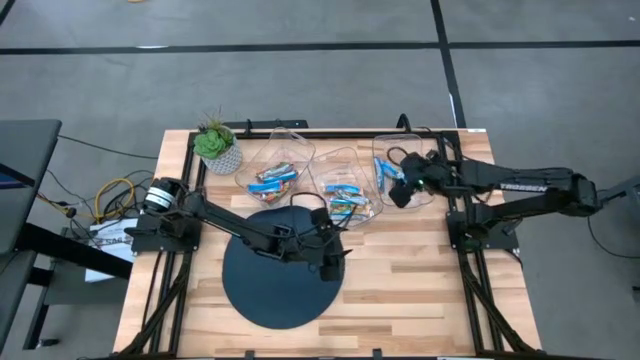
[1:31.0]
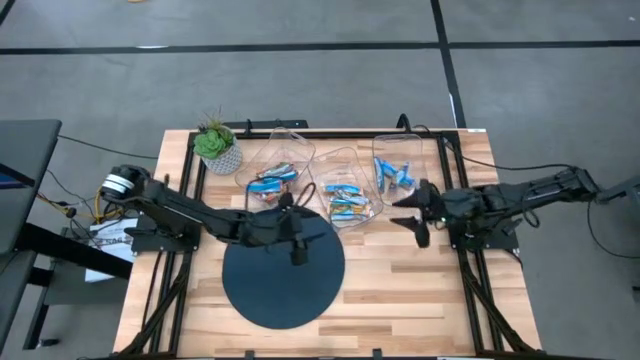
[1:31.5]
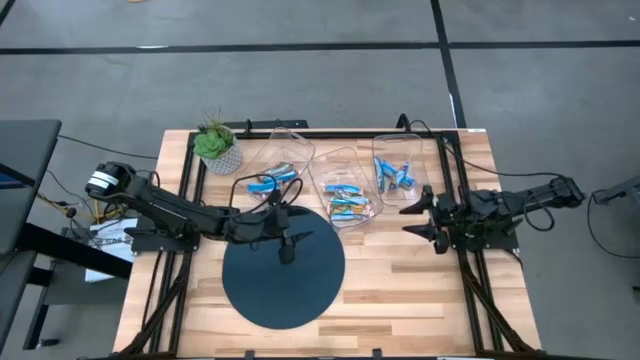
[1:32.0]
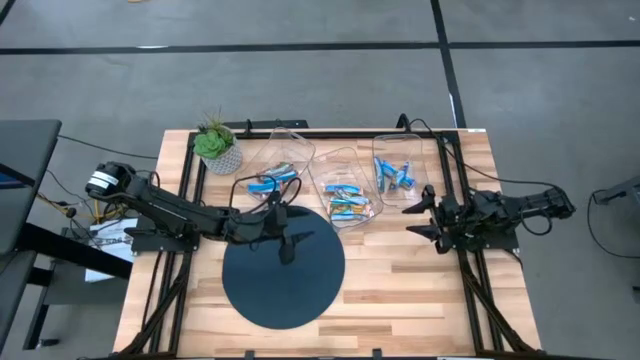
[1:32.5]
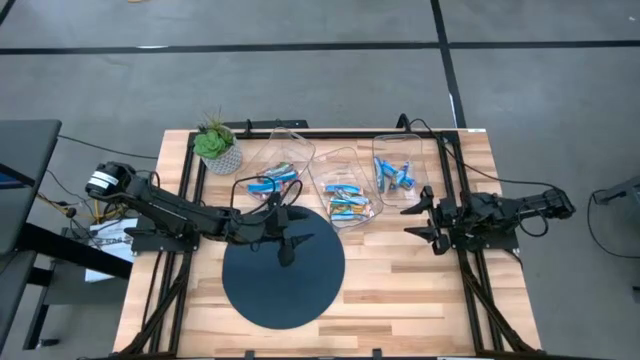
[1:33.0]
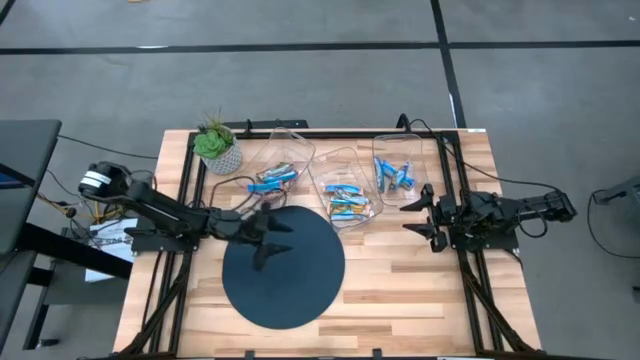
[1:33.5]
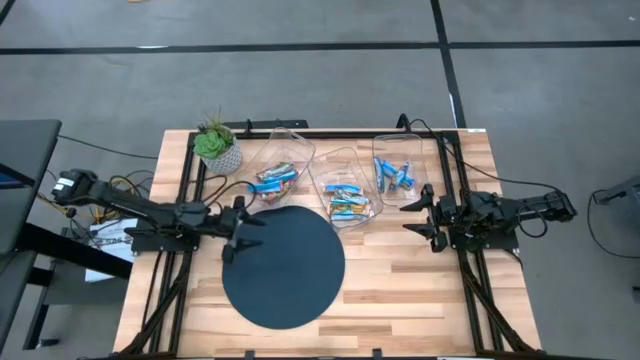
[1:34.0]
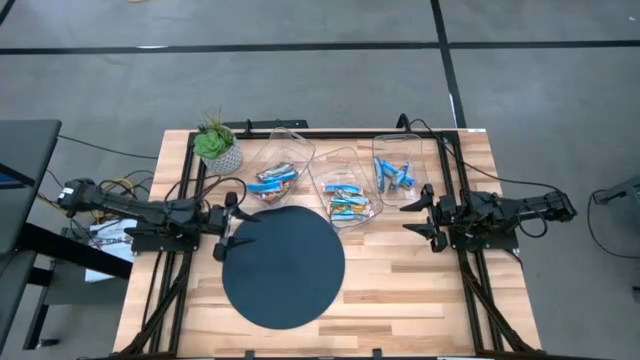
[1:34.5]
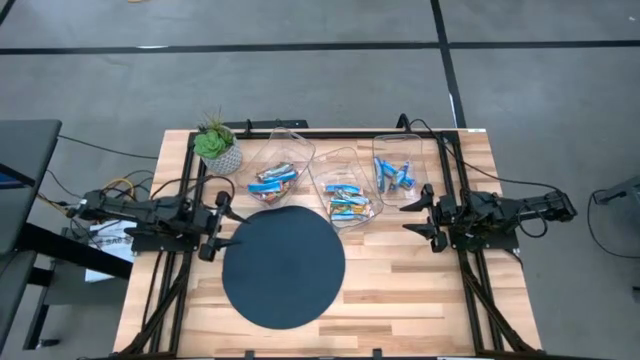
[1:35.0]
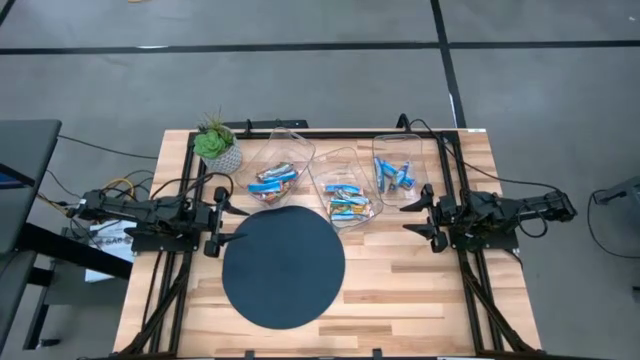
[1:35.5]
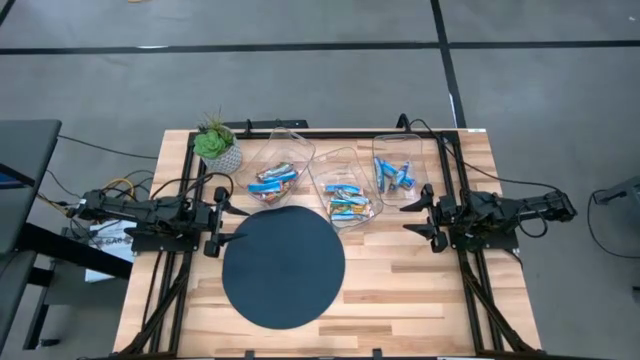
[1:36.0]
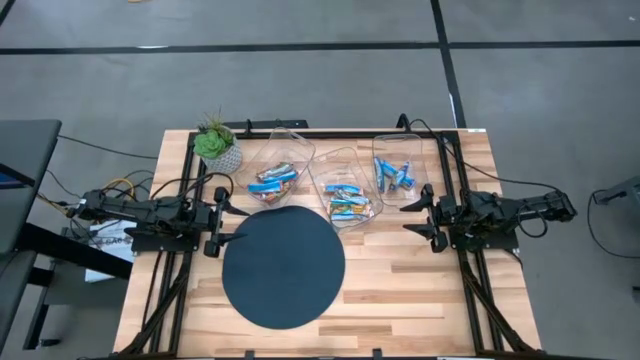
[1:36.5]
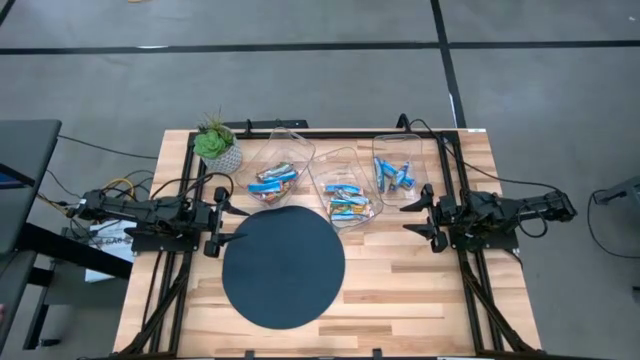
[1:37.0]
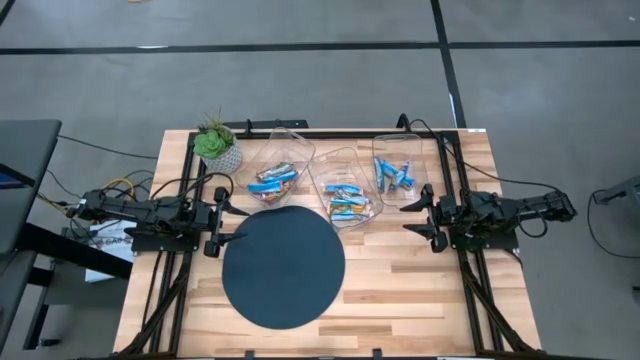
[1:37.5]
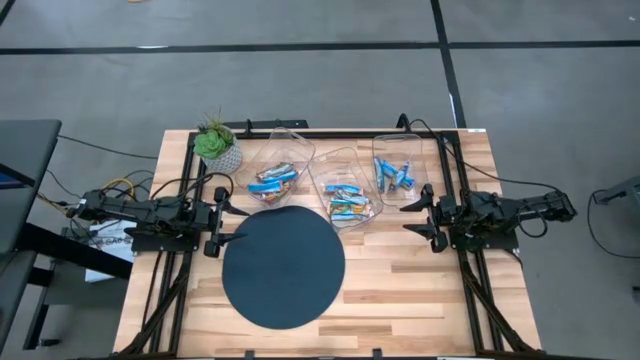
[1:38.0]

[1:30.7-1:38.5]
Task: Pick and place Granola Bars by type
Return to Home Position

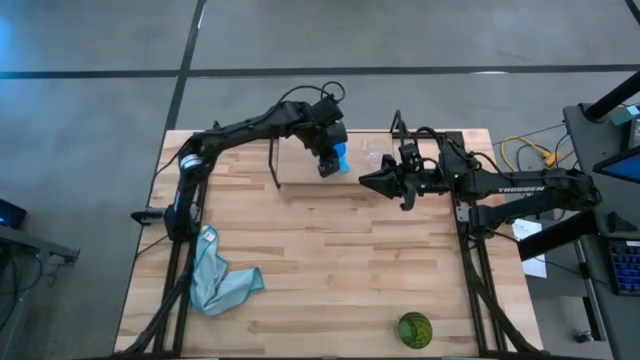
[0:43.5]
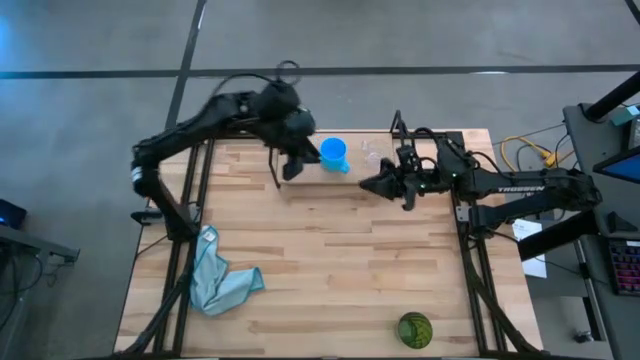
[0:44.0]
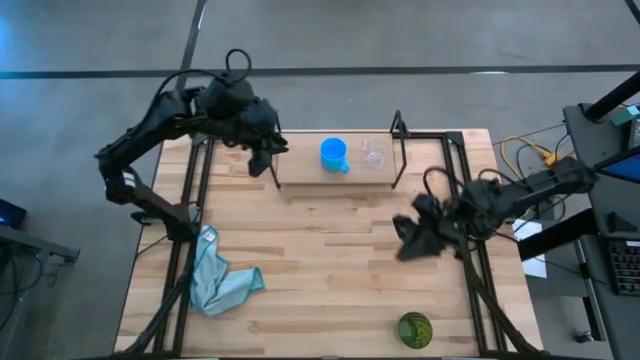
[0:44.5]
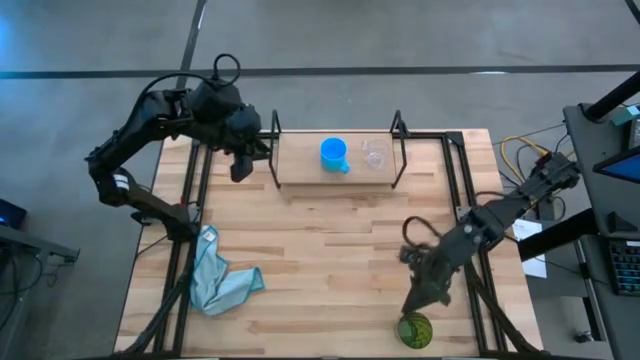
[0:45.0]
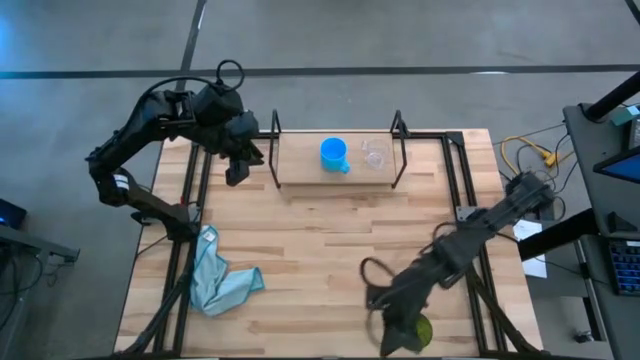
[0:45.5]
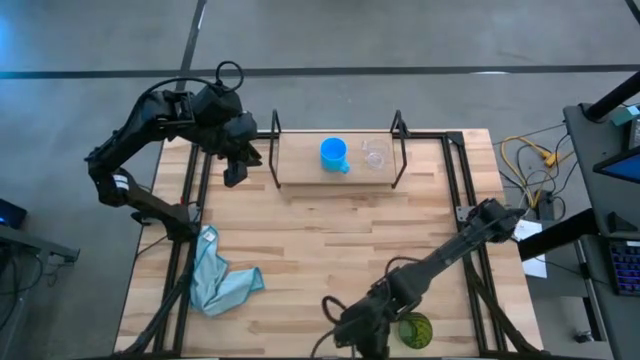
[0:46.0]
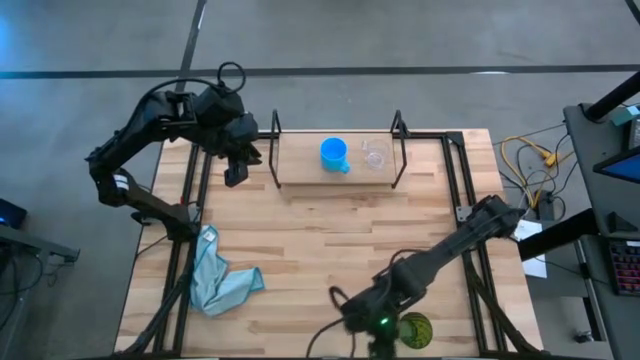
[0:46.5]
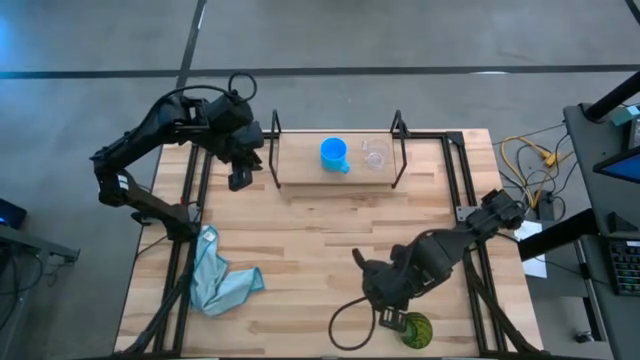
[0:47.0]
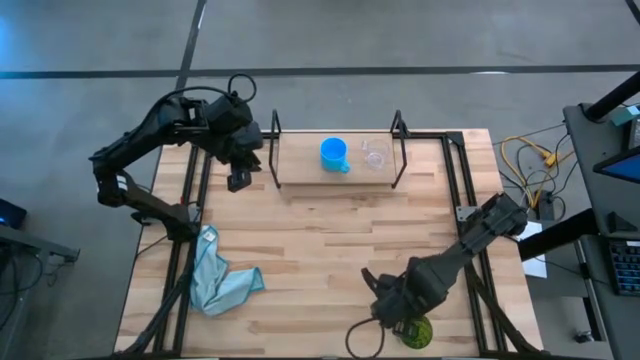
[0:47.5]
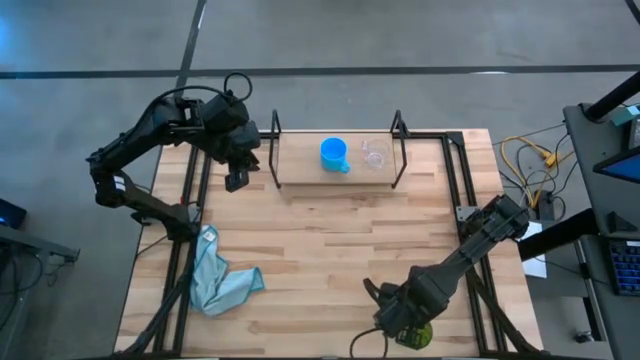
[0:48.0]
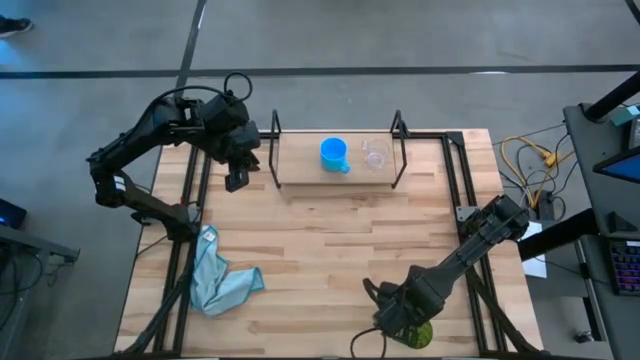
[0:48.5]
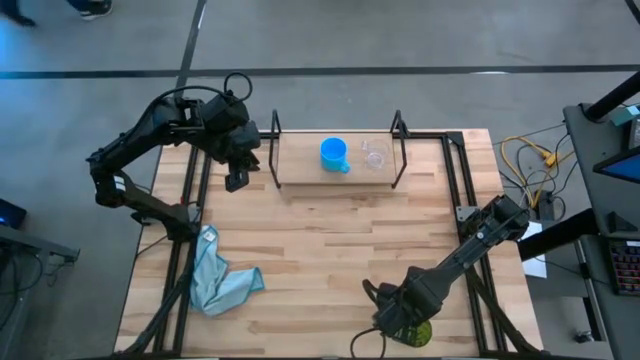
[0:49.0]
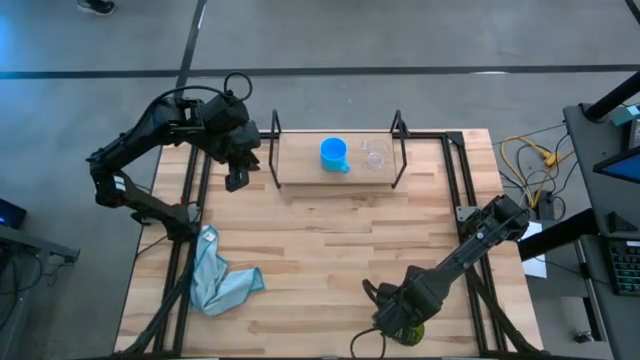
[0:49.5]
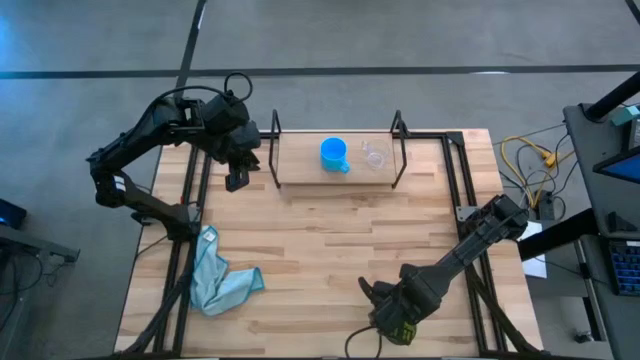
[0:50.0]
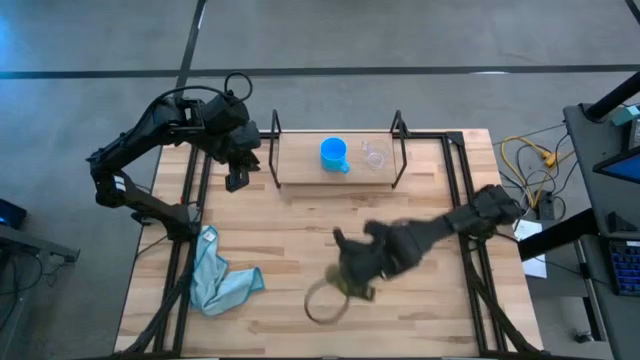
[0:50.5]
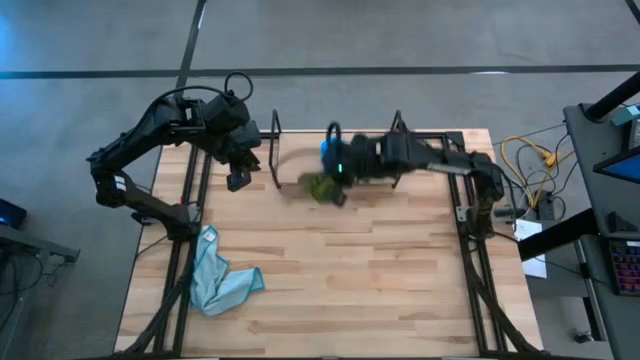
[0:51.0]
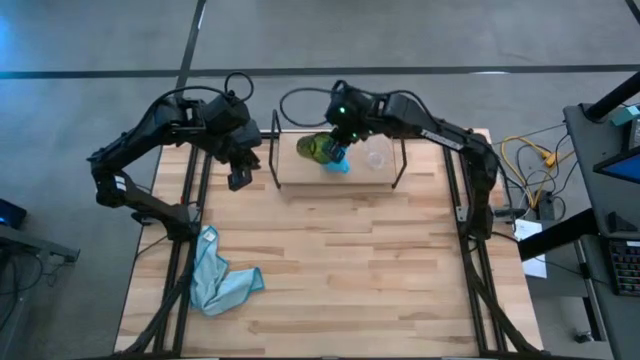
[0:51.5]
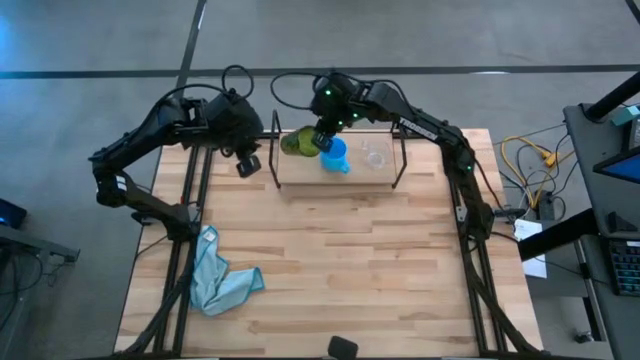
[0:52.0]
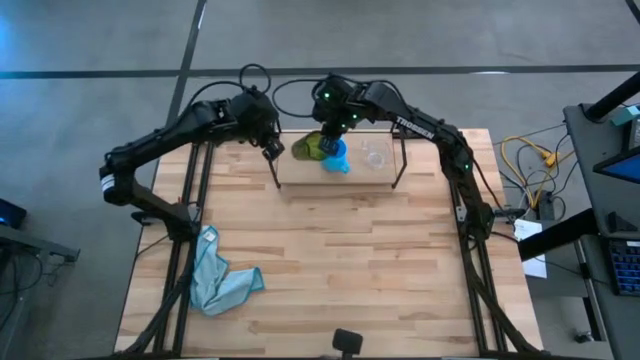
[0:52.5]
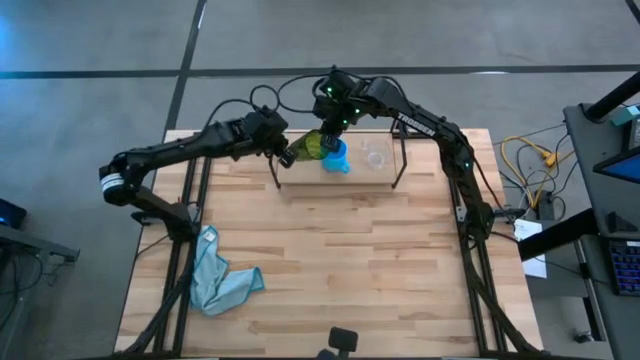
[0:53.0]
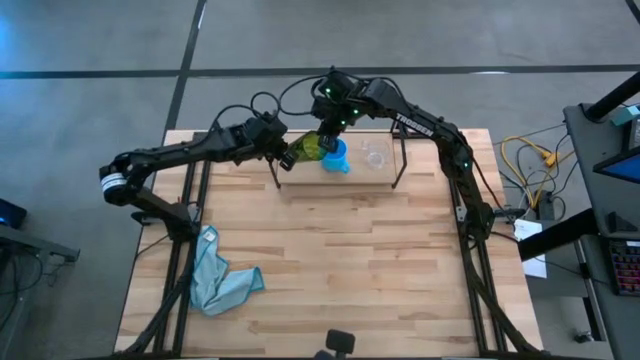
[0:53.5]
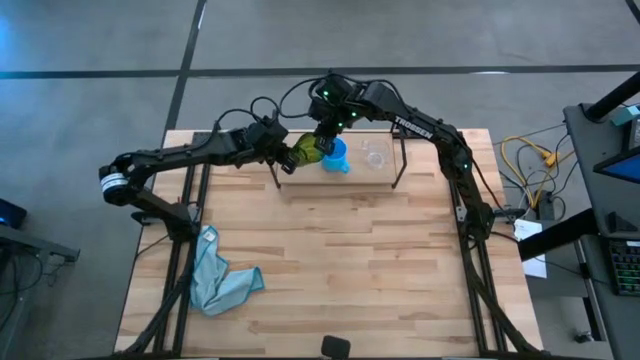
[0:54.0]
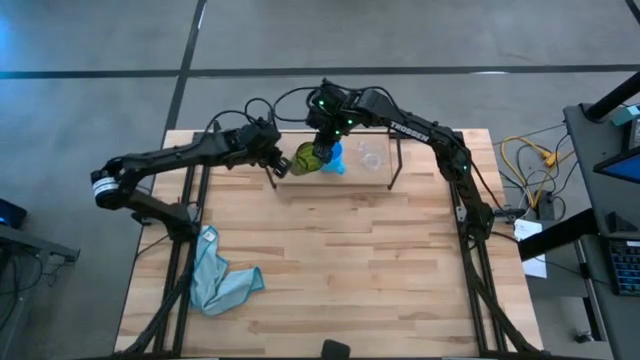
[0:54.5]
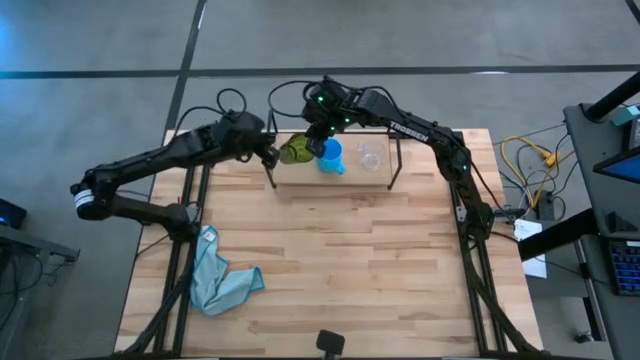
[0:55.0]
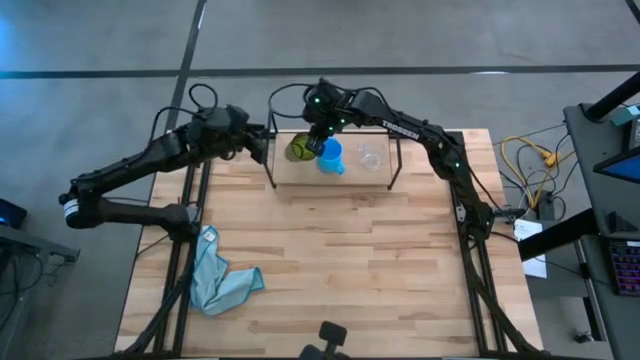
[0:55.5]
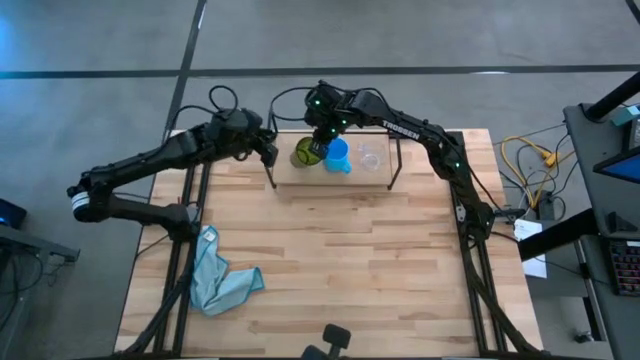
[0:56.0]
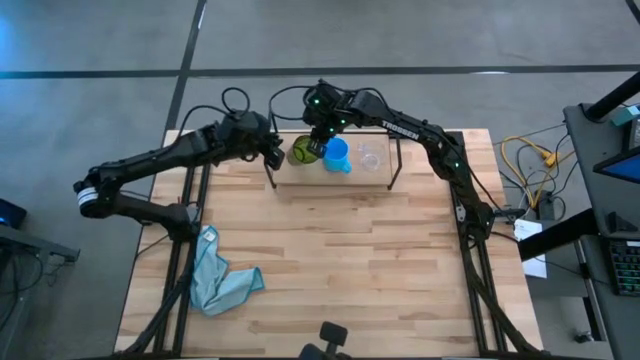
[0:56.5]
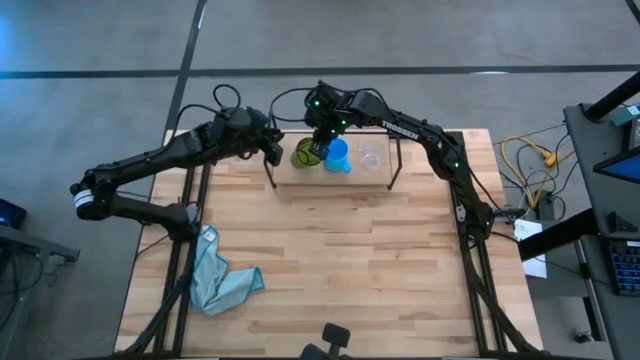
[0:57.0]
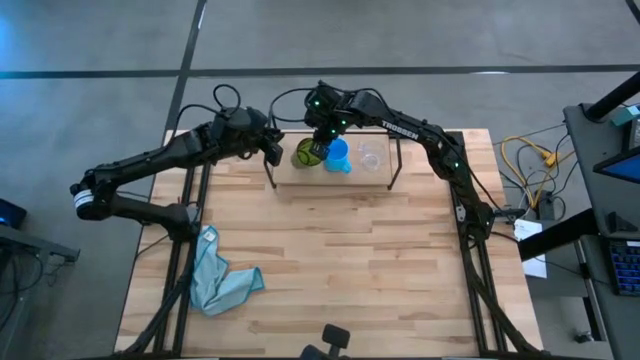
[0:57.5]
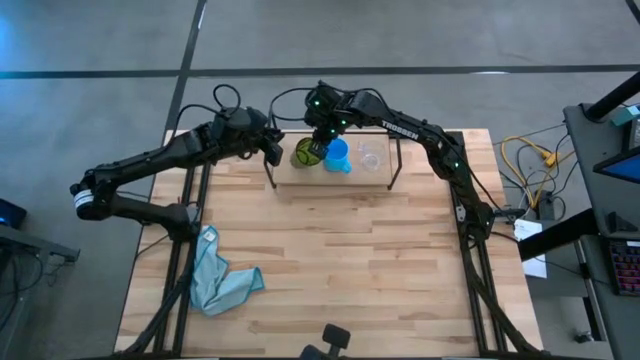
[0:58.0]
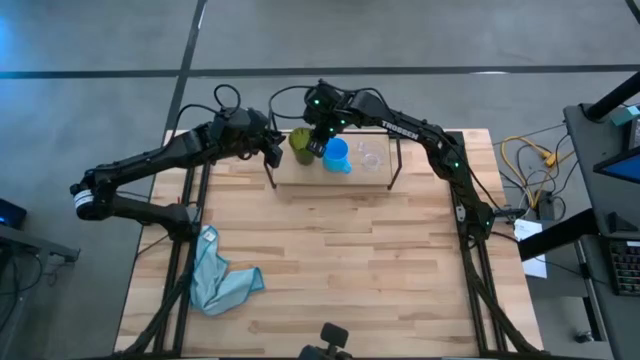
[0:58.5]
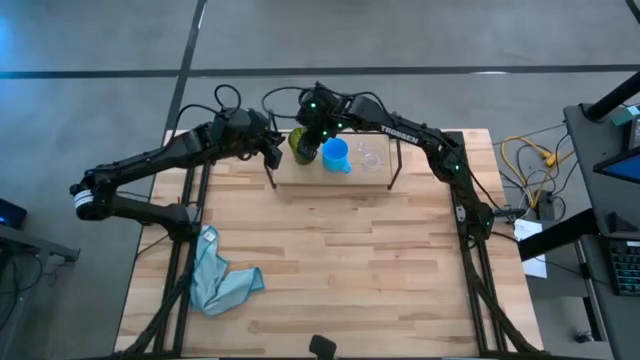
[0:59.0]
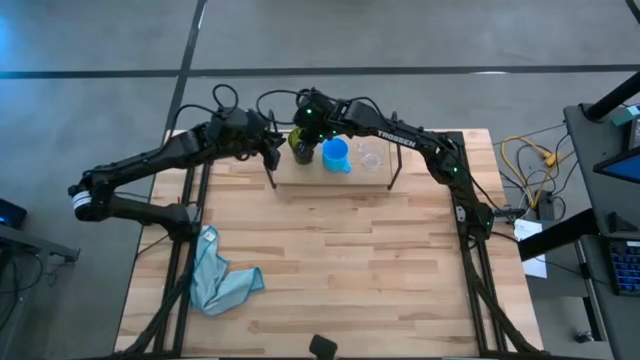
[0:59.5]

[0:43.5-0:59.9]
Task: Stack small to large cups/mugs on shelf
Put the green cup on the shelf
